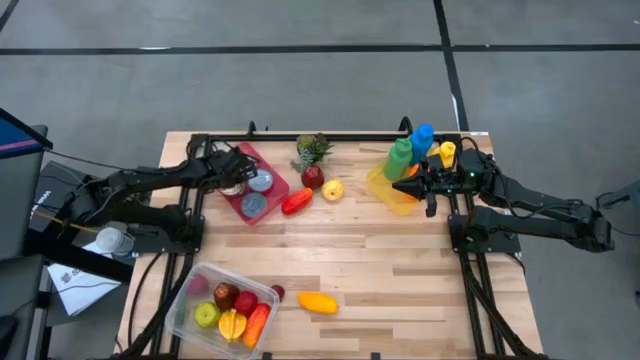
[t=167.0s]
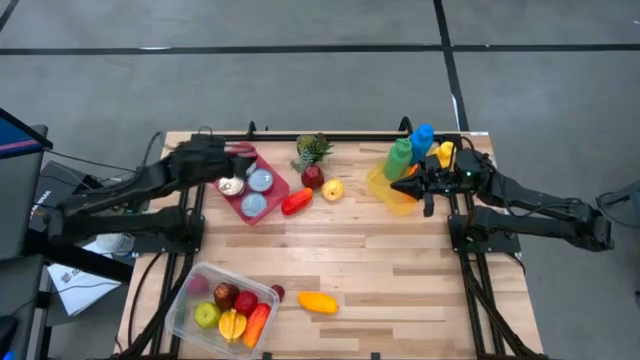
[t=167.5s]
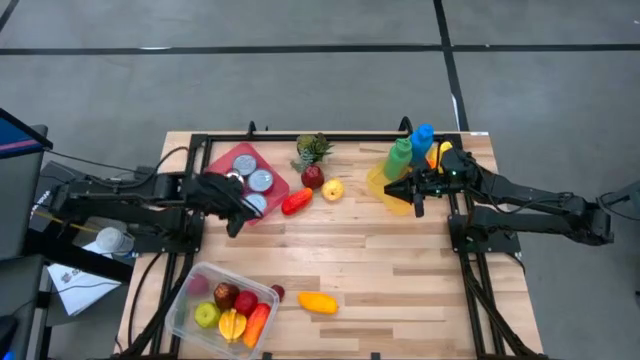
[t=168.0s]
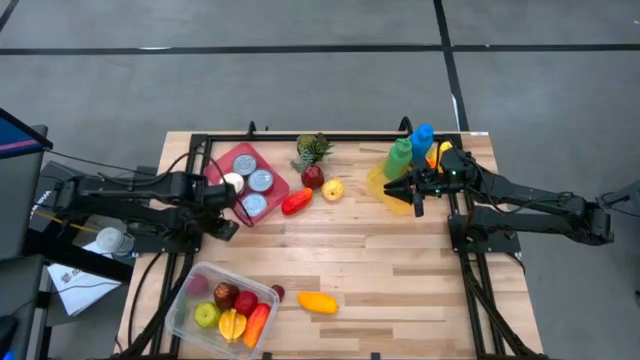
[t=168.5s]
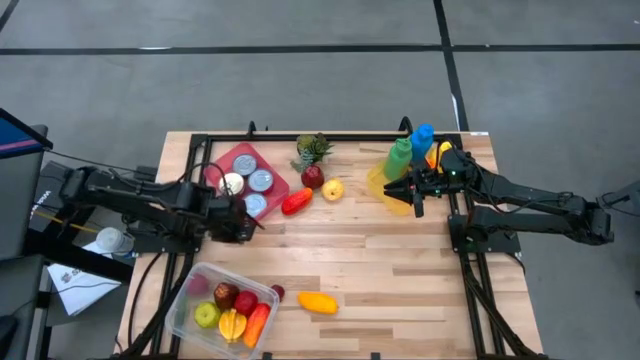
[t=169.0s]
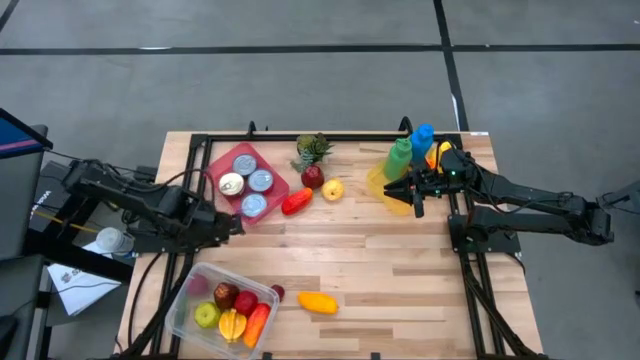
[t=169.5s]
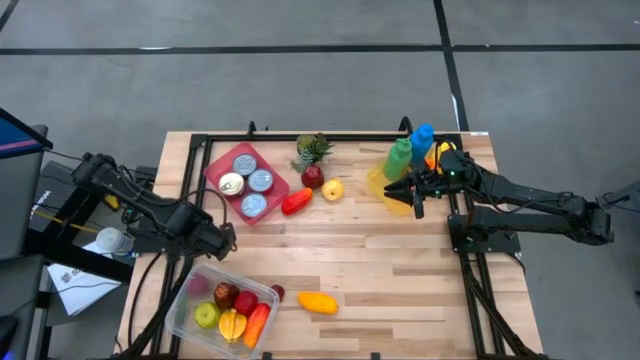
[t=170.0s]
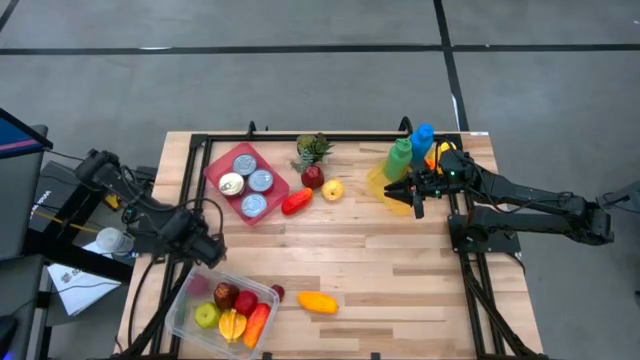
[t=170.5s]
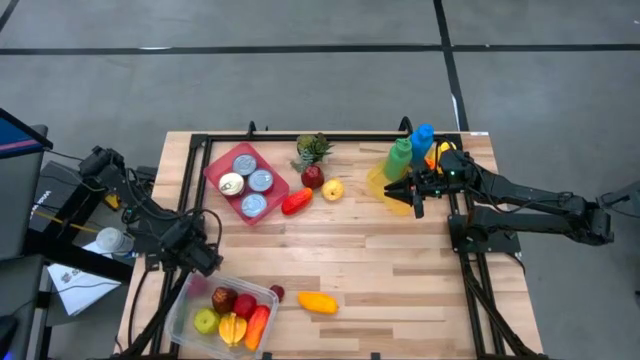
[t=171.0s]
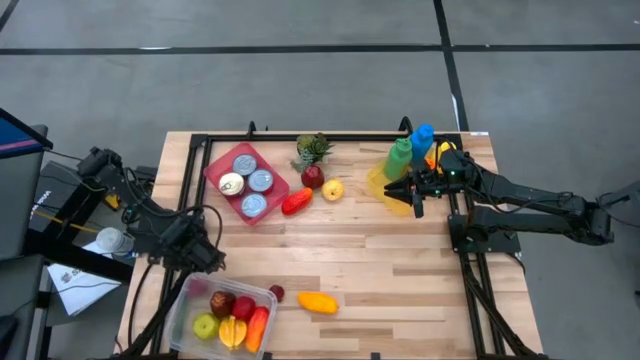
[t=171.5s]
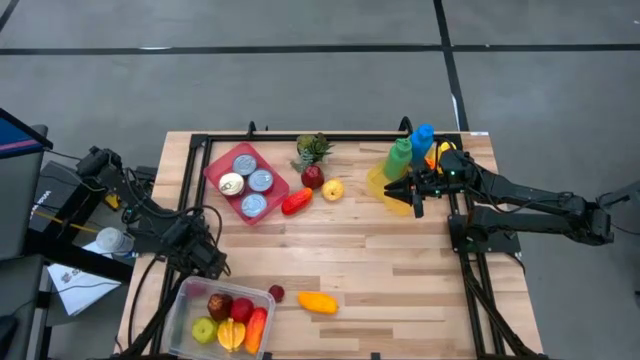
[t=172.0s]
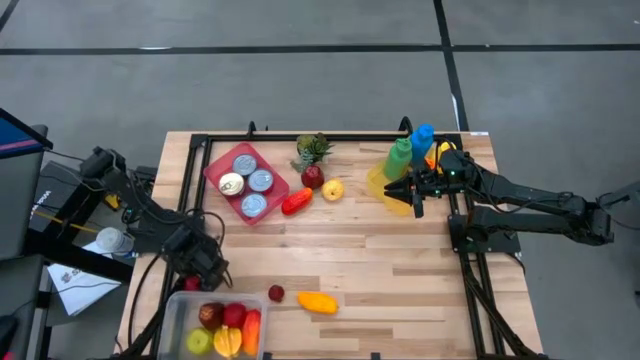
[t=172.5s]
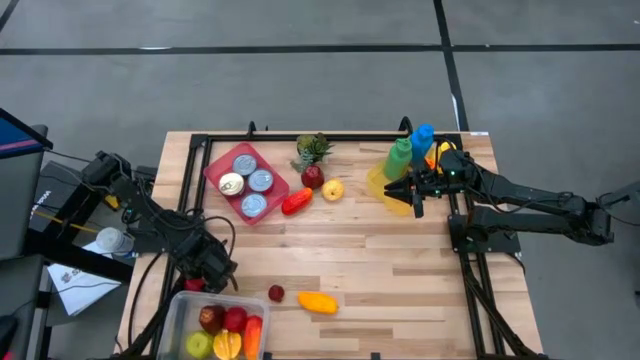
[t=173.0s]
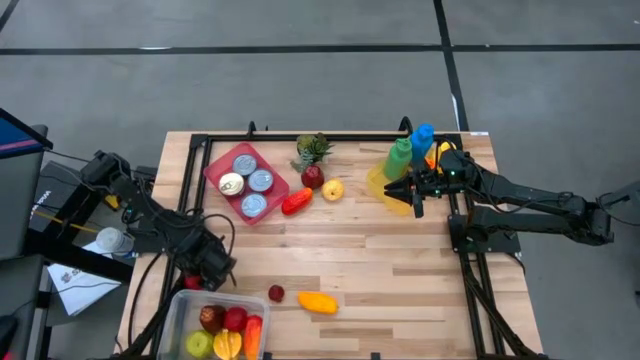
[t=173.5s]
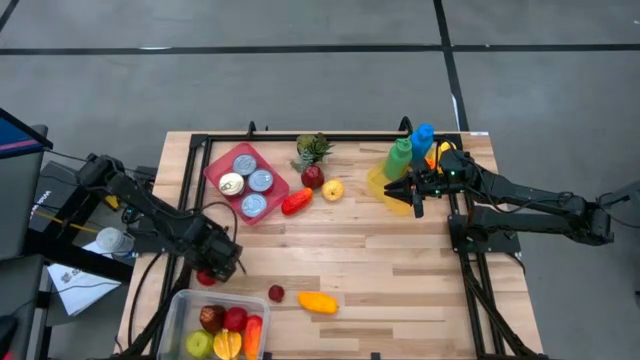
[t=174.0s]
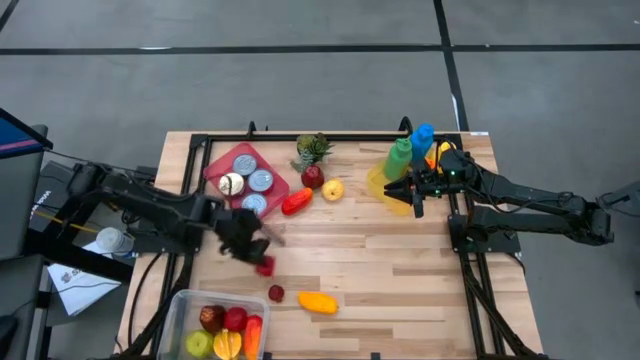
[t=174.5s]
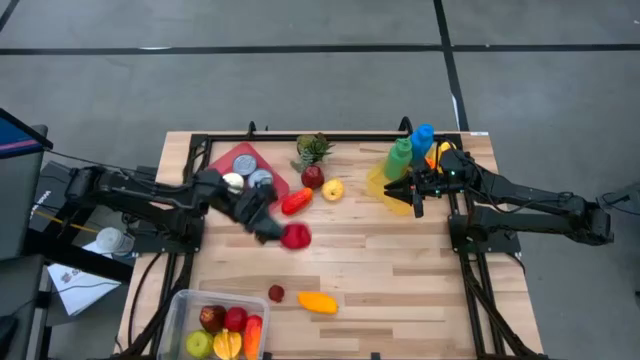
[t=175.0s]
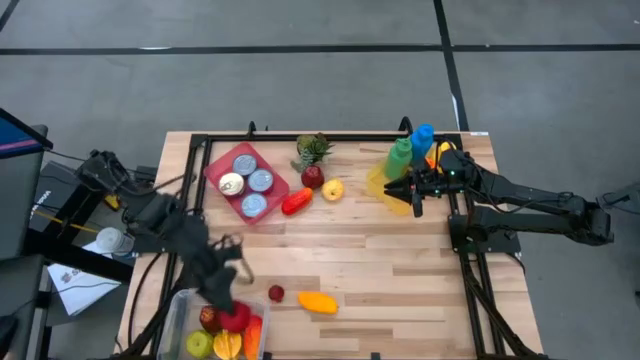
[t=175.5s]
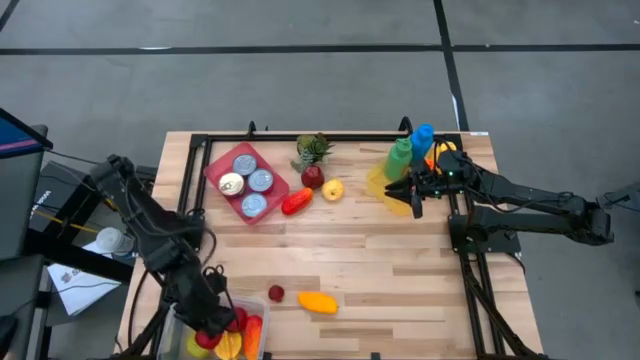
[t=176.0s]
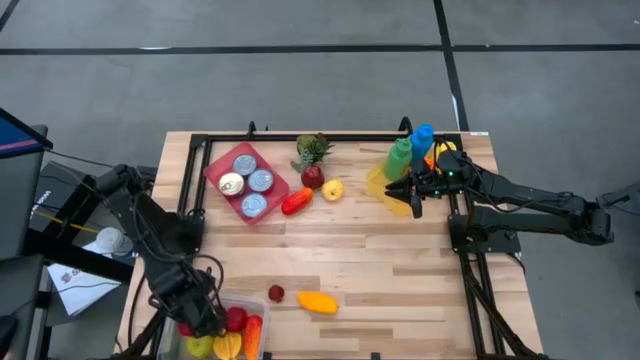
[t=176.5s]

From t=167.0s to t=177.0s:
Task: Pick & Place Food Item
Put the red tomato into the transparent bin

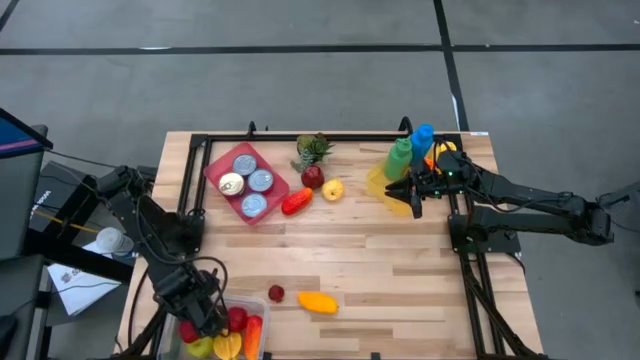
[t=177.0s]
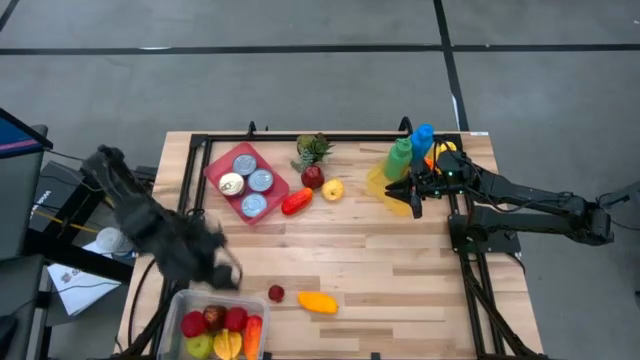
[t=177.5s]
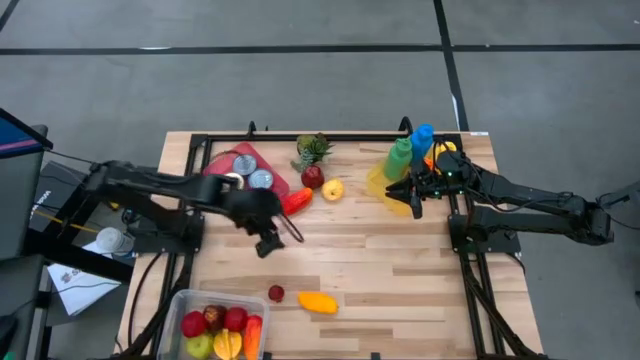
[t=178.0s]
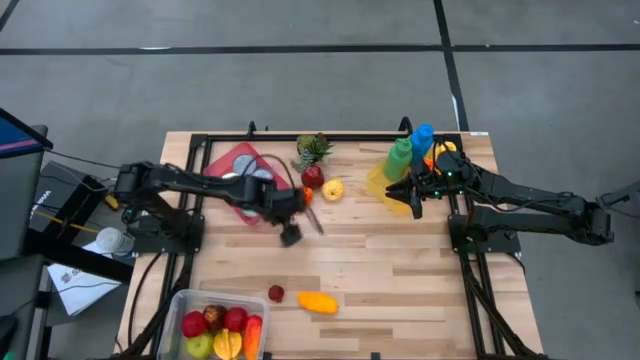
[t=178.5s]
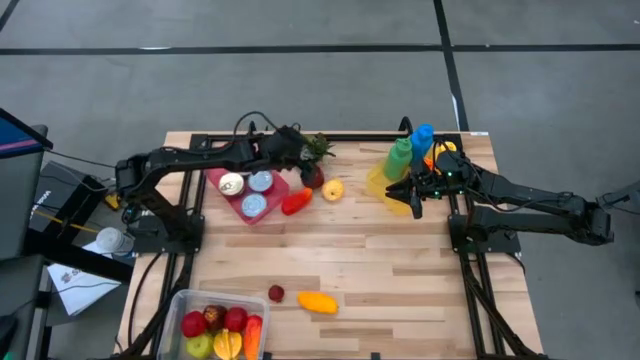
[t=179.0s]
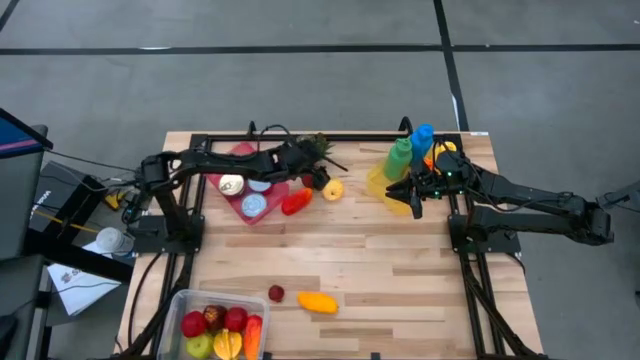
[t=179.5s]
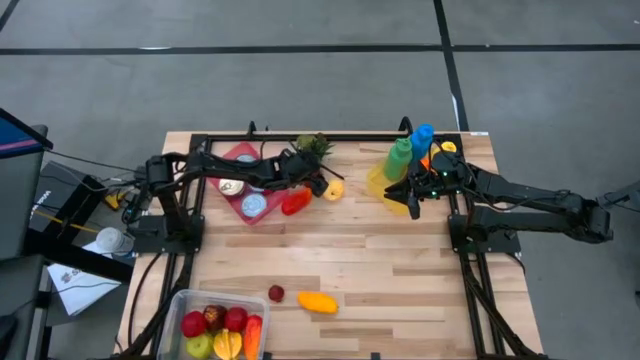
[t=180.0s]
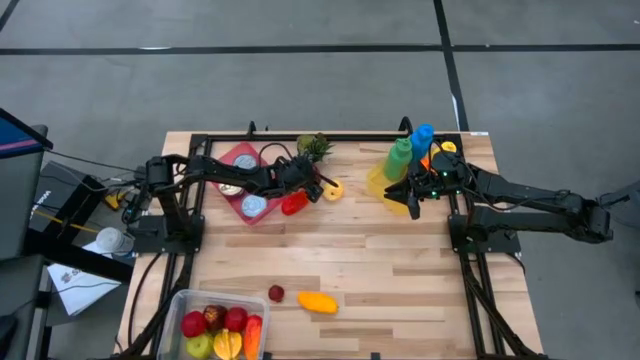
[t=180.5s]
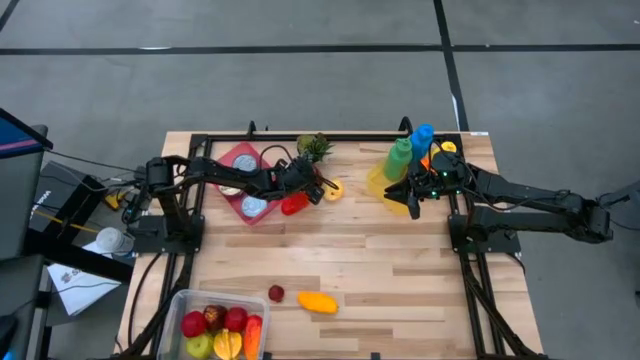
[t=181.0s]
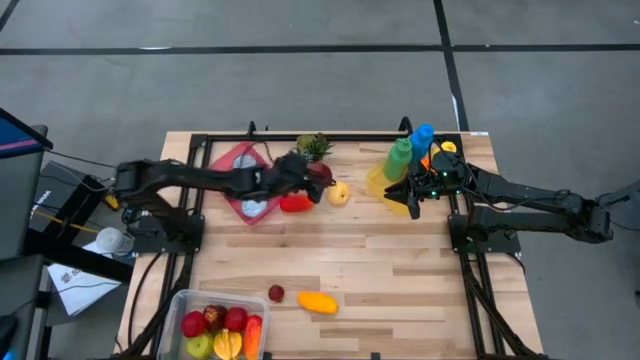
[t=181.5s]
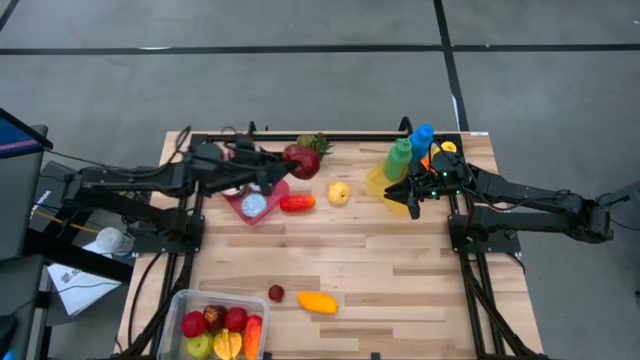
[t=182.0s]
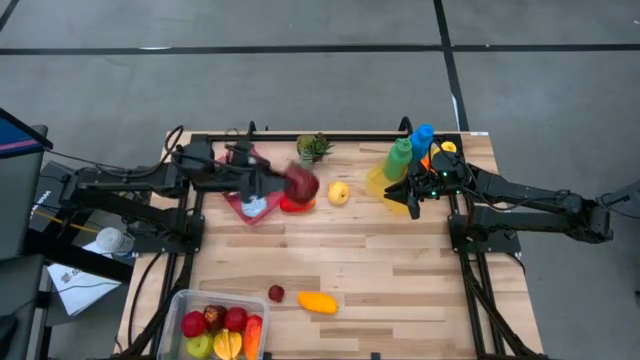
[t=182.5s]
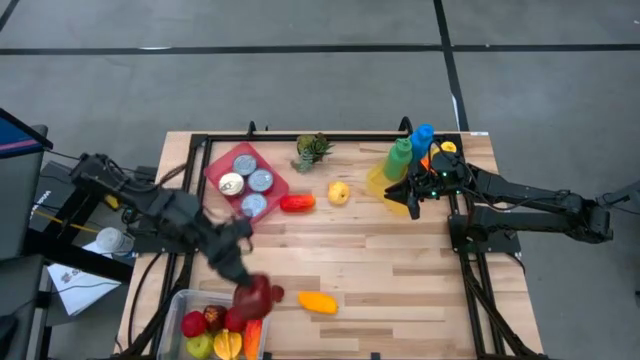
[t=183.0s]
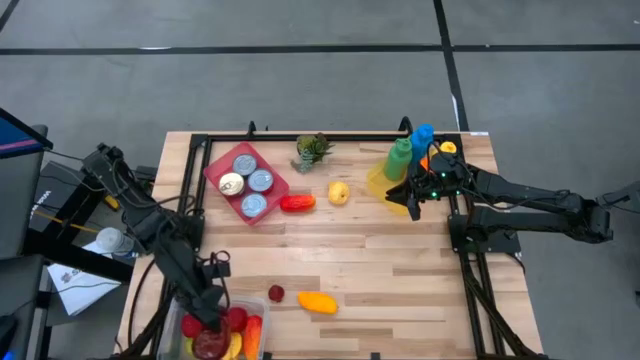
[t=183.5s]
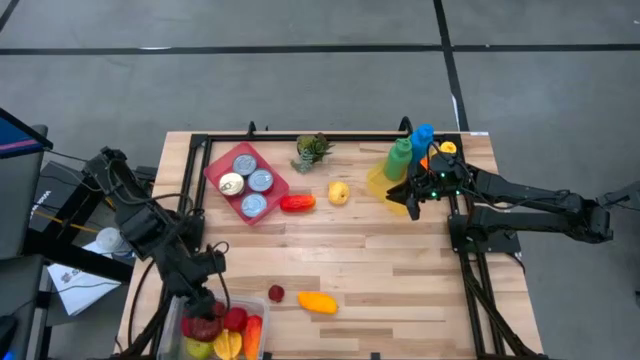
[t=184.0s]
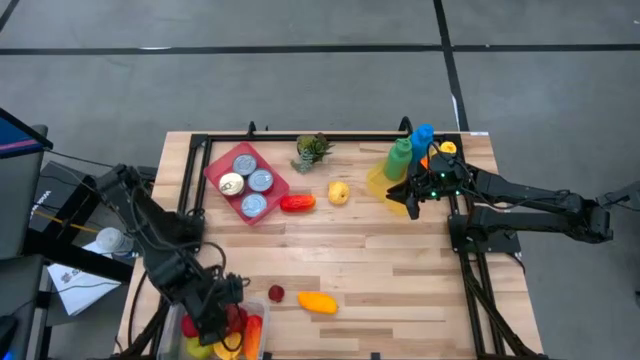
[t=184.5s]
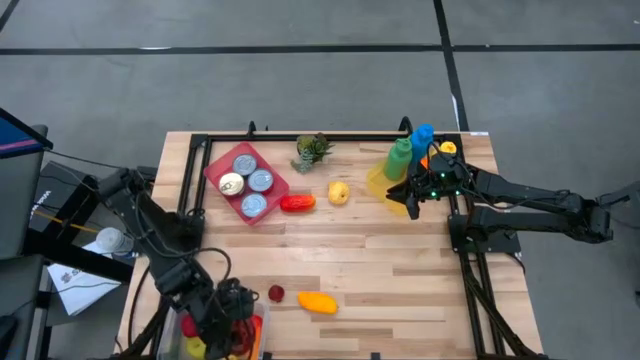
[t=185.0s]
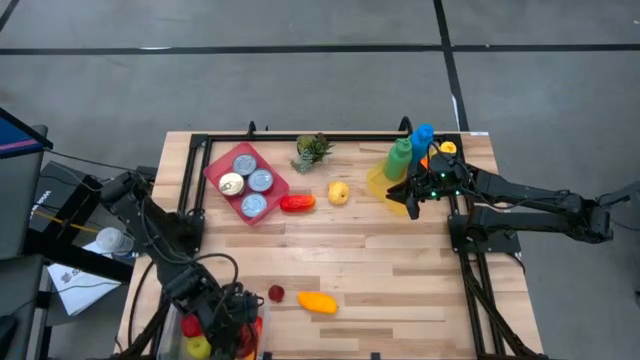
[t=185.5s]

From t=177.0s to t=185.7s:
Put the dark red apple into the transparent bin

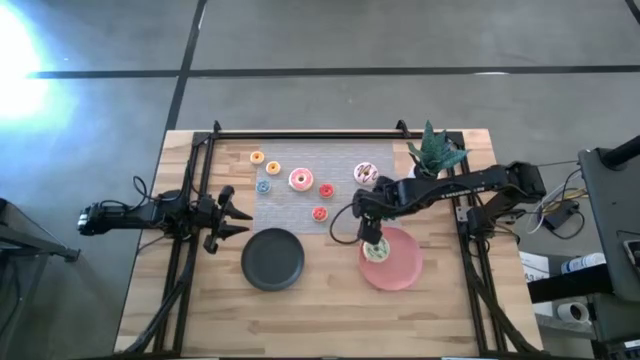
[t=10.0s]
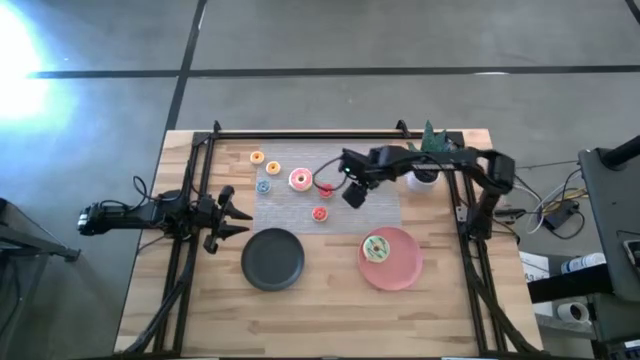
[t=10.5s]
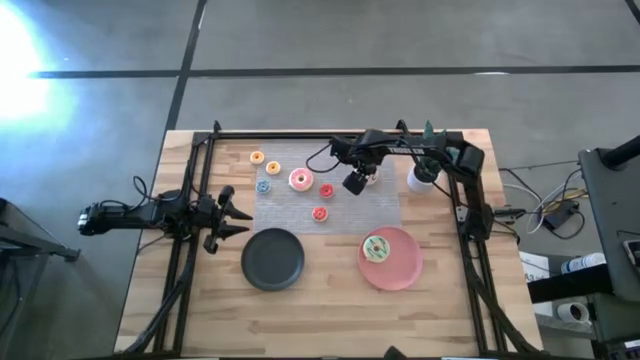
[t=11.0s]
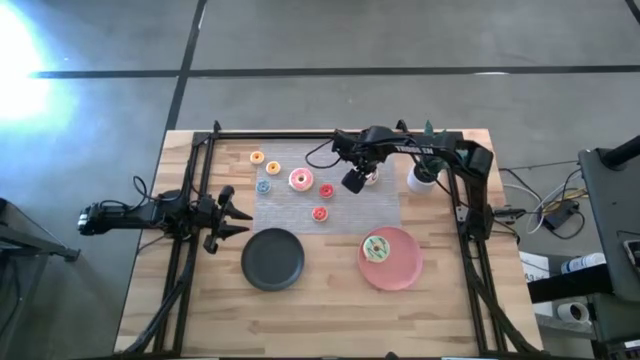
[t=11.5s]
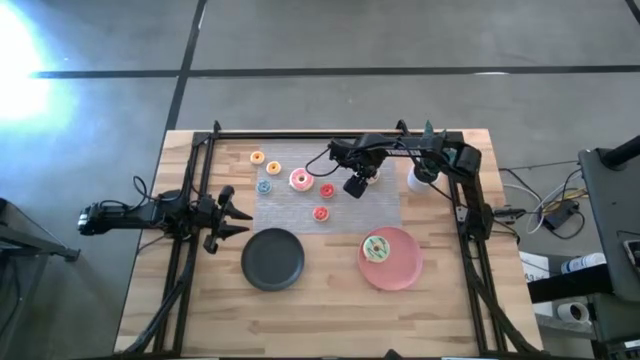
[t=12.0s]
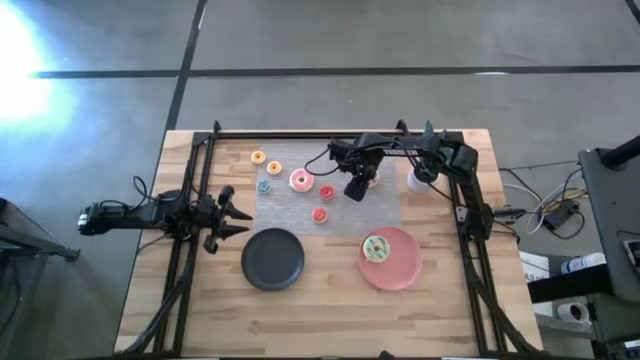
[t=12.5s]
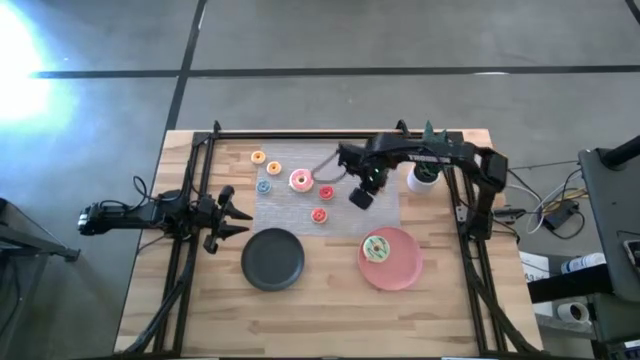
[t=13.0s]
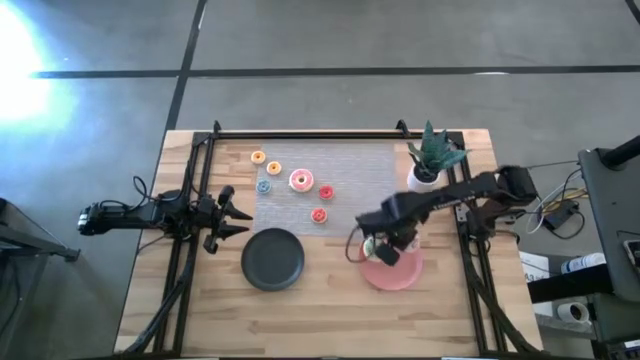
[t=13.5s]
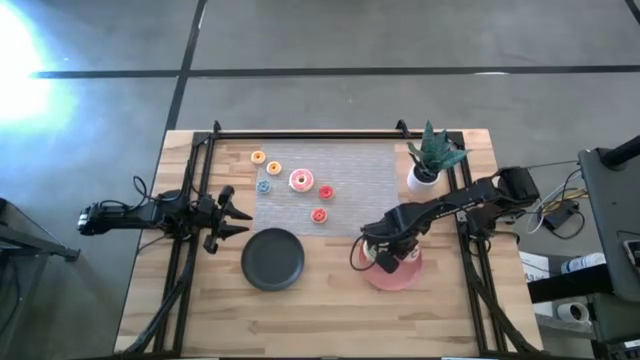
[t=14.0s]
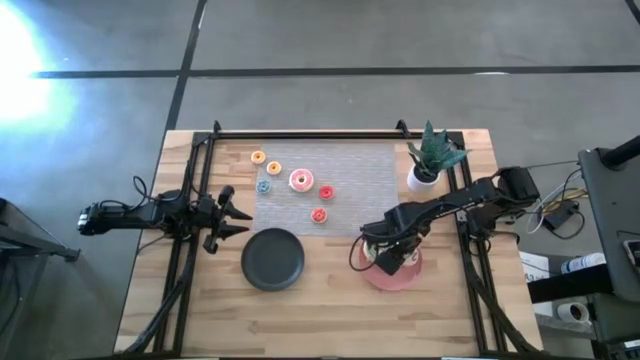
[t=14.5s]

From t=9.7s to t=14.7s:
Task: Pick & Place donuts
Put the large purple donut on the pink plate
